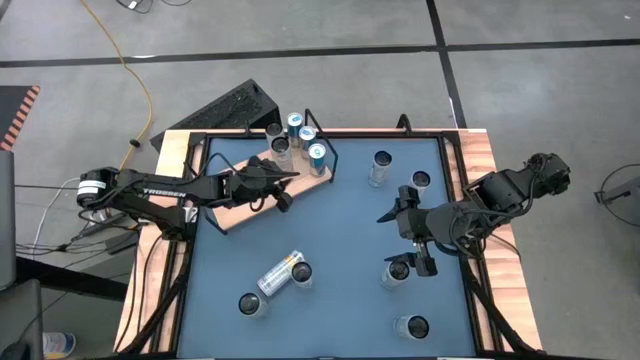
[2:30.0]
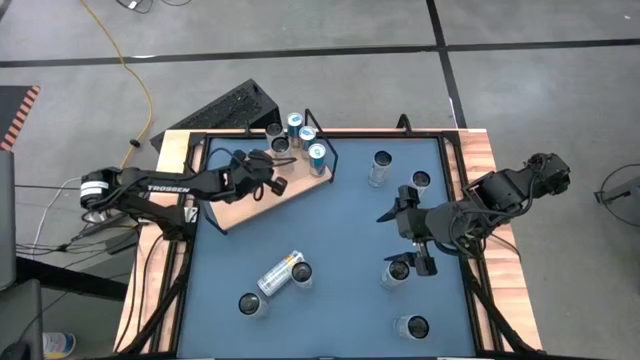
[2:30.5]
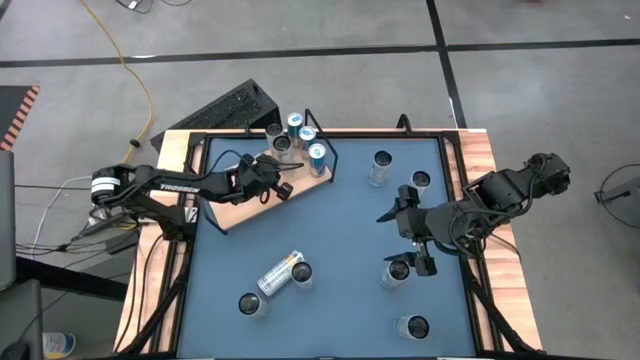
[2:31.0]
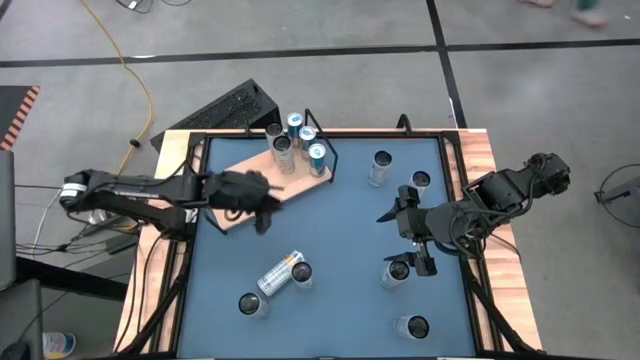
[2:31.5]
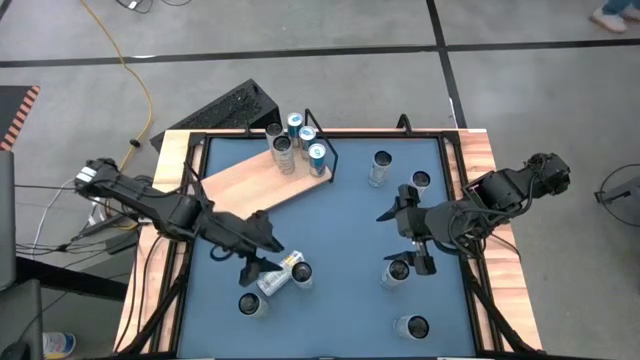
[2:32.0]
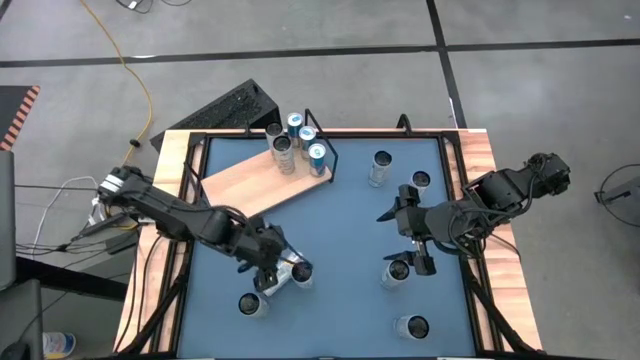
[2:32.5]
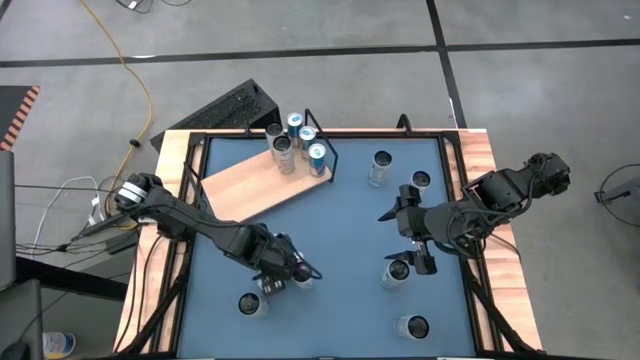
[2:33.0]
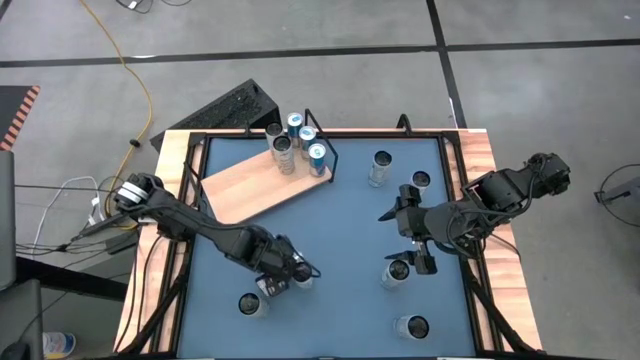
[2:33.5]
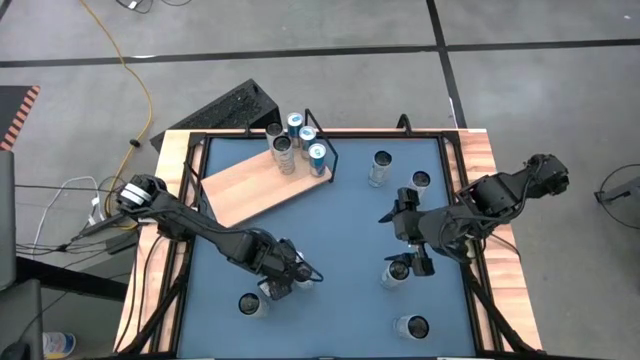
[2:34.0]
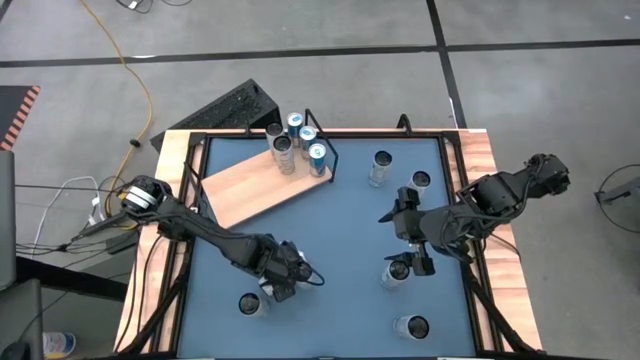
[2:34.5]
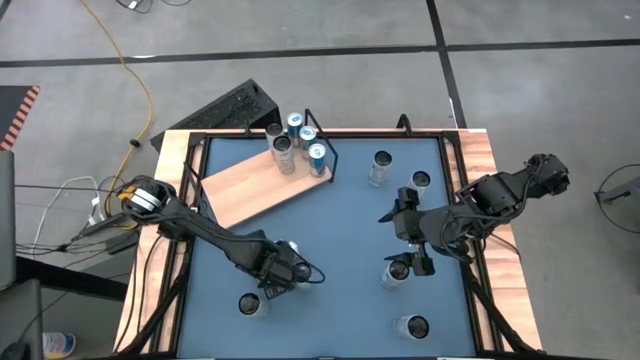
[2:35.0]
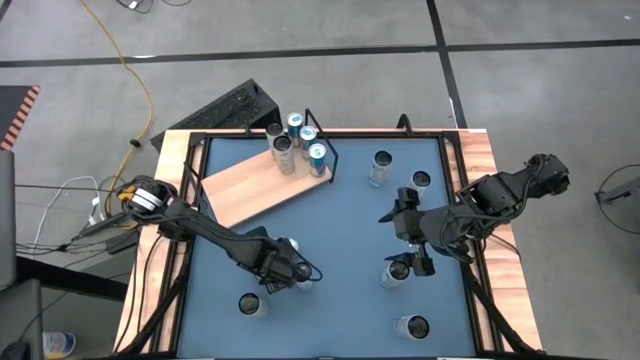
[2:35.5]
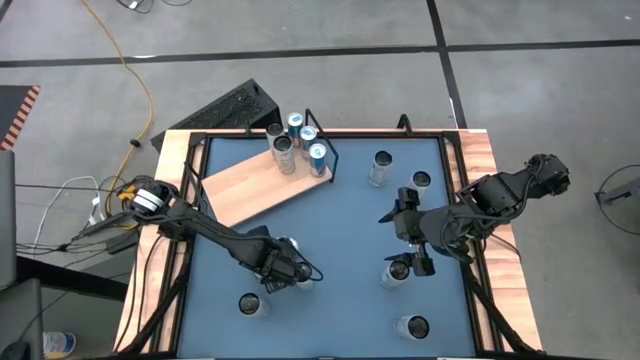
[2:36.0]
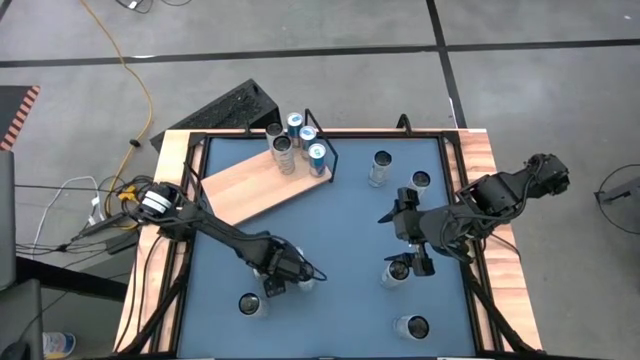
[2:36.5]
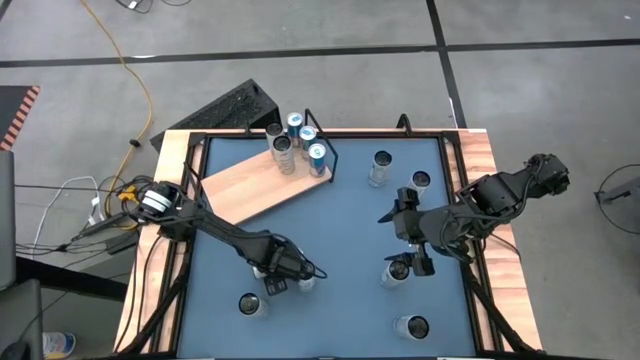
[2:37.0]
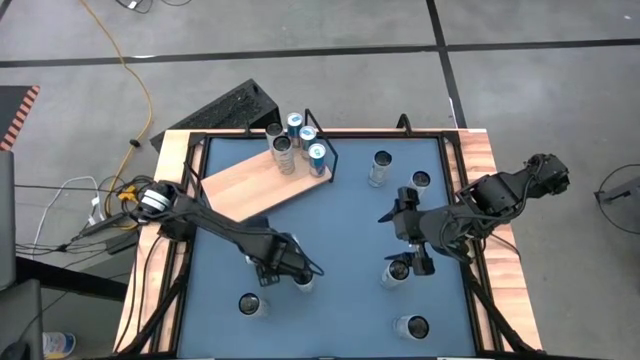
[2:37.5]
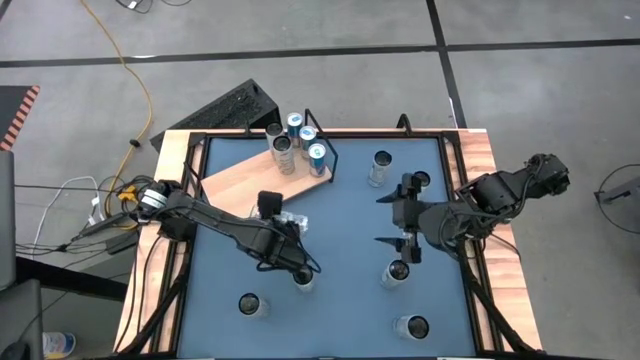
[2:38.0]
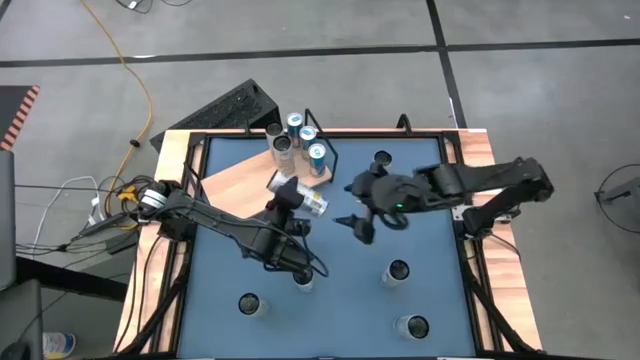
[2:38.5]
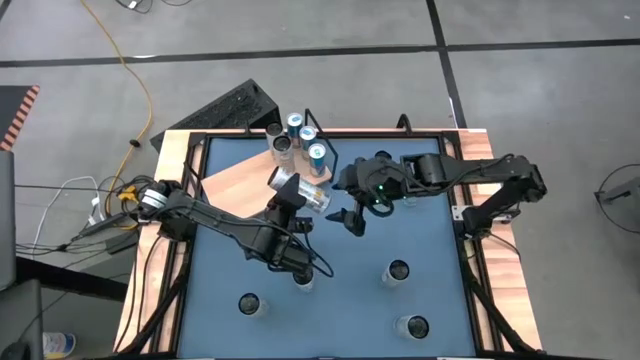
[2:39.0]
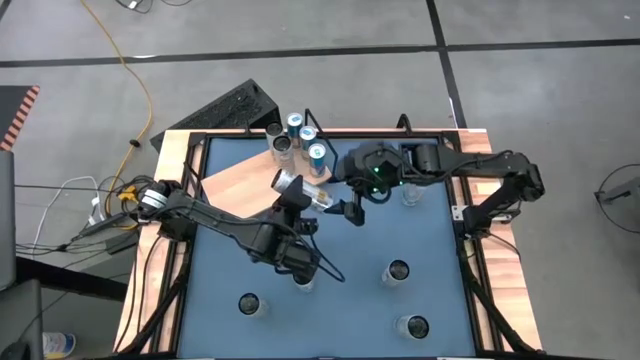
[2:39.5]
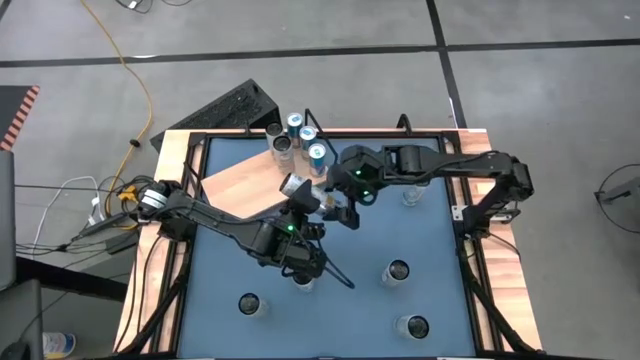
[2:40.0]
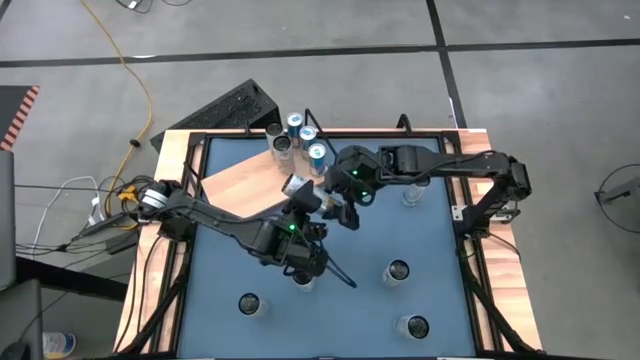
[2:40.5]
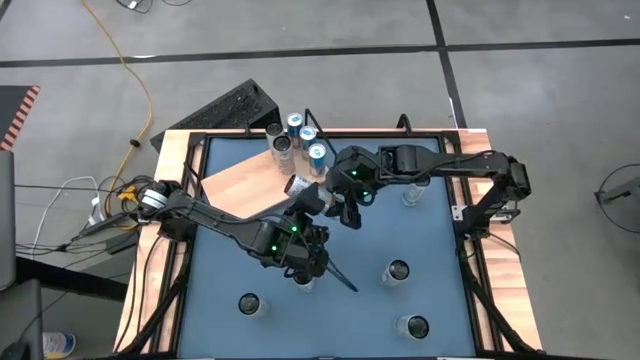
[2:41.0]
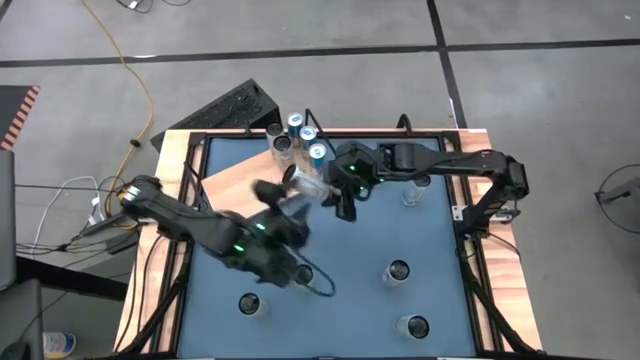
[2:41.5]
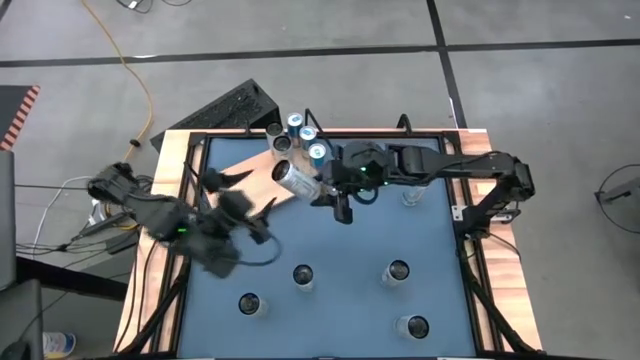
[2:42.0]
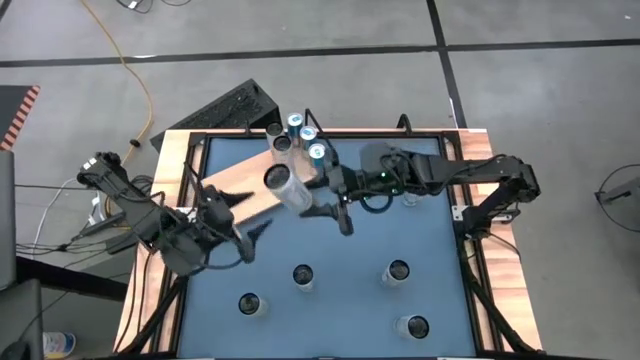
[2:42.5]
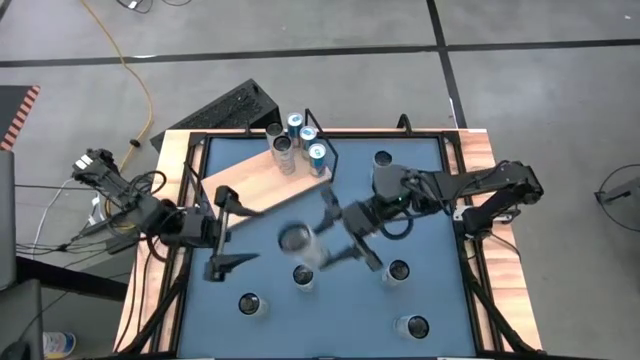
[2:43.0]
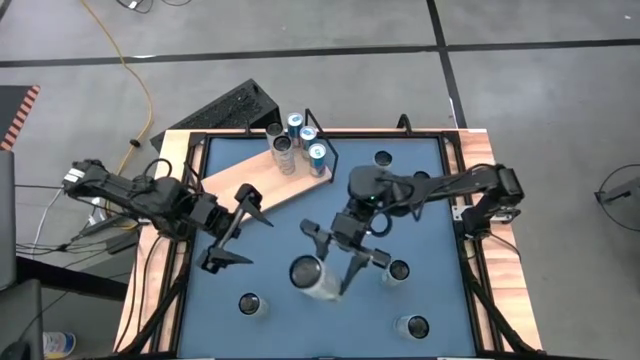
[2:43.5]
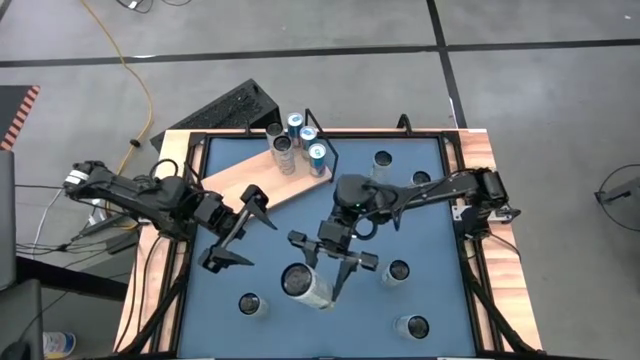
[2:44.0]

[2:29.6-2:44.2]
Task: Place canned beverage on shelf
Put the white and yellow soda can on the shelf aligned with the other white and yellow soda cans

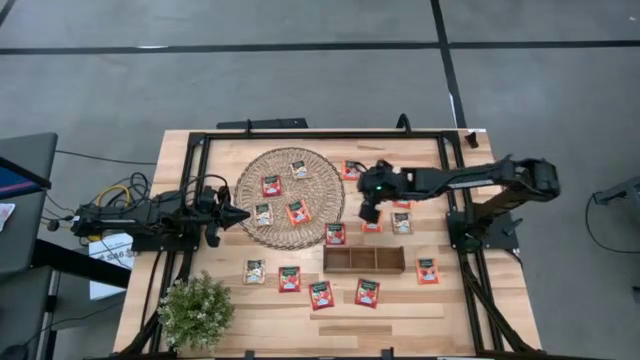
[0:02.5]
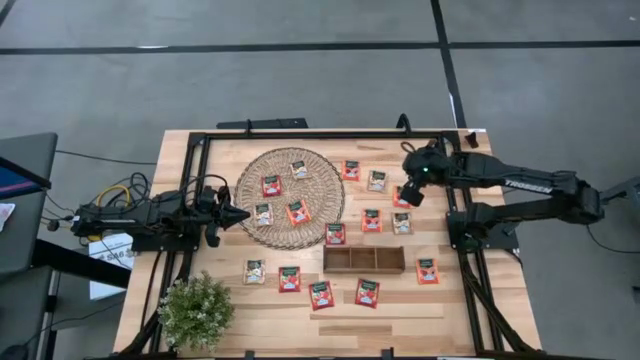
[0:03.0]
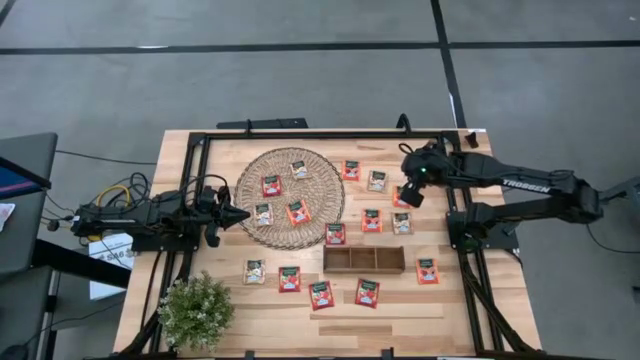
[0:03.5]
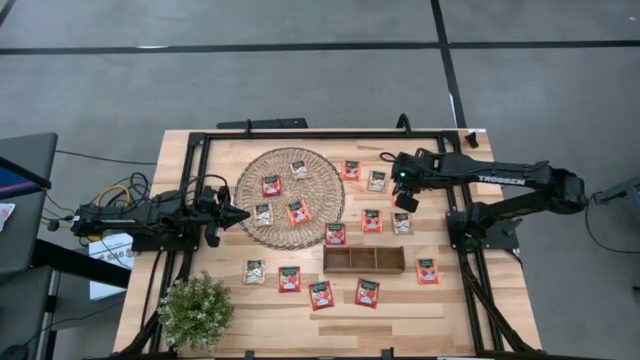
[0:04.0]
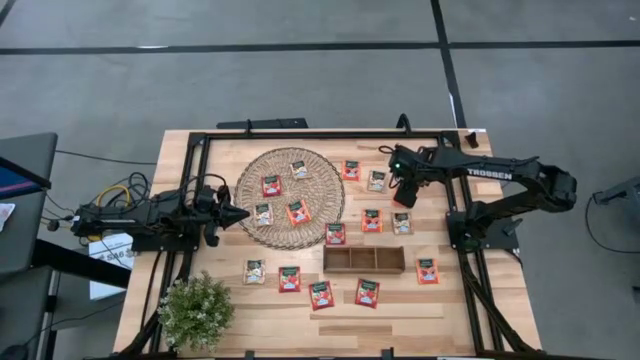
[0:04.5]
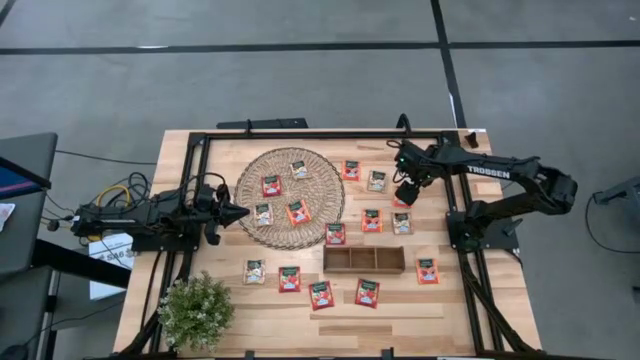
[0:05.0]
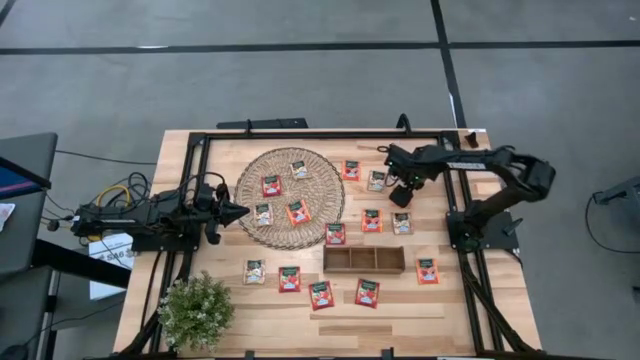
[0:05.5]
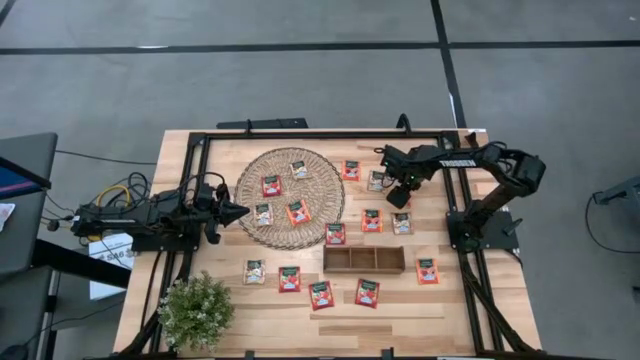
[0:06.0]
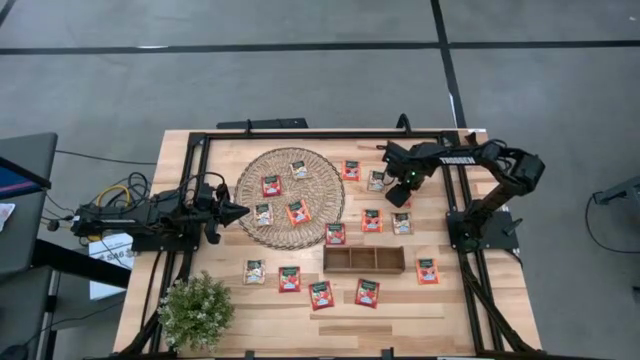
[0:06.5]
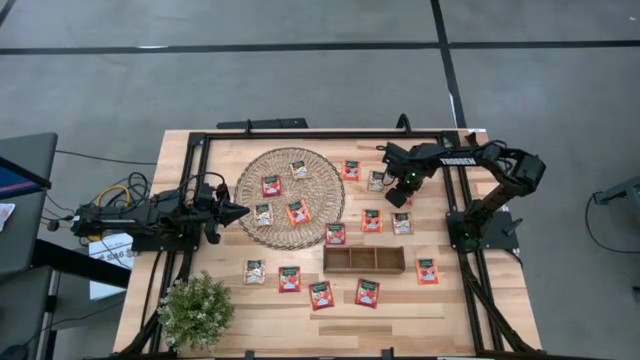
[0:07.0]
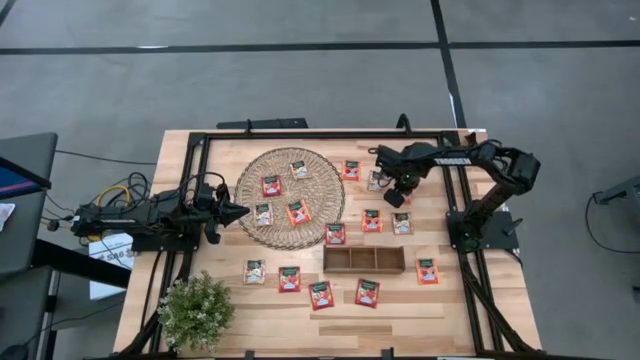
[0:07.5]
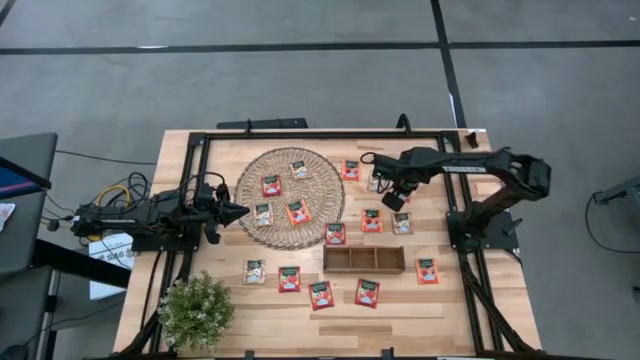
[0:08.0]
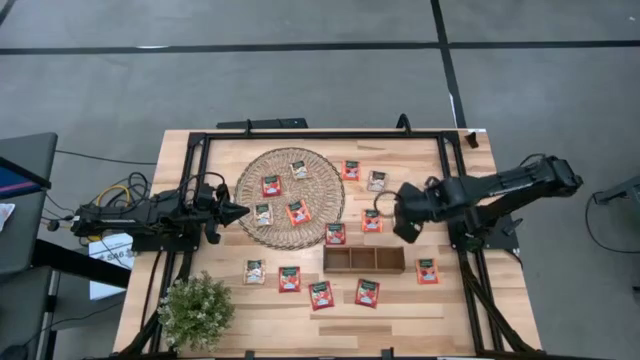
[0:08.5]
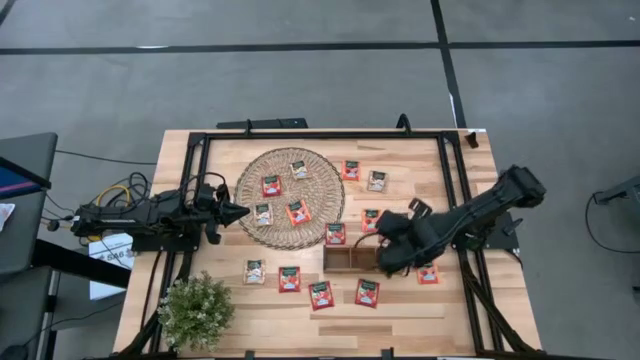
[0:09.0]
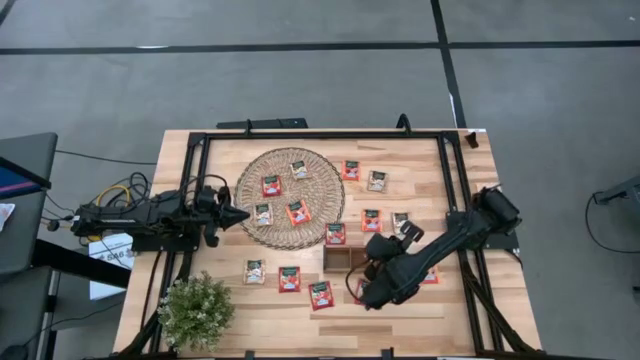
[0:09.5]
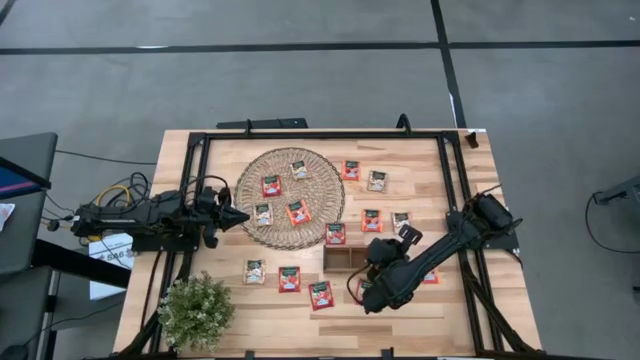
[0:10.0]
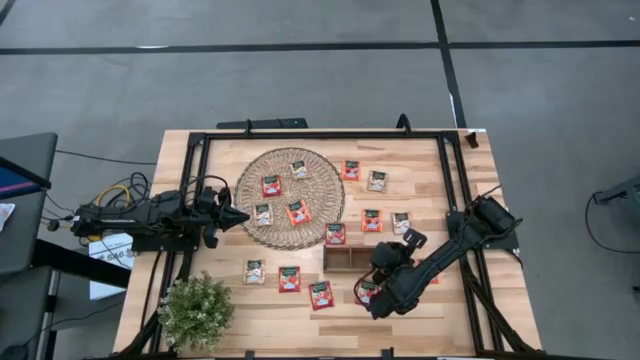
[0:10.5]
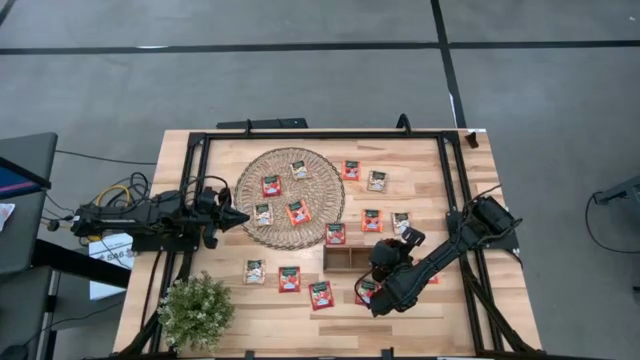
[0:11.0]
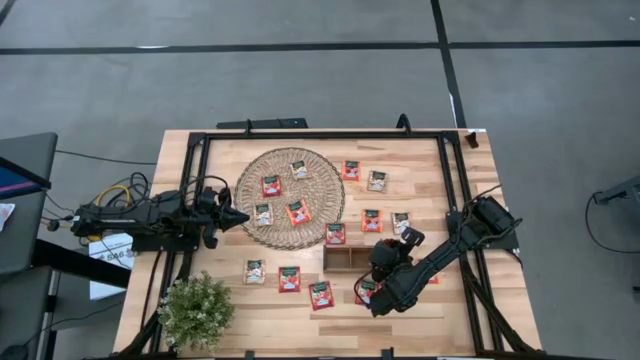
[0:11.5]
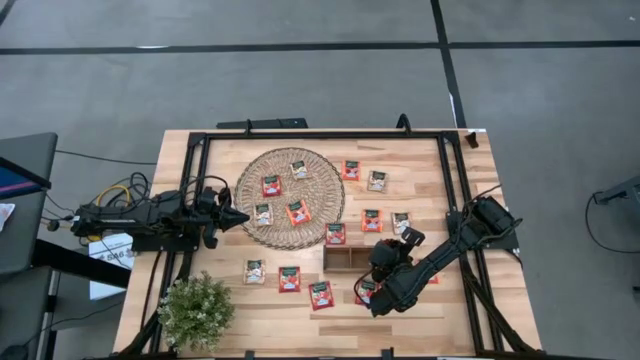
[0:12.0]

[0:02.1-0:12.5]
Task: Pick & Place Tea
Put the orange tea bag into the right section of the wooden organizer
